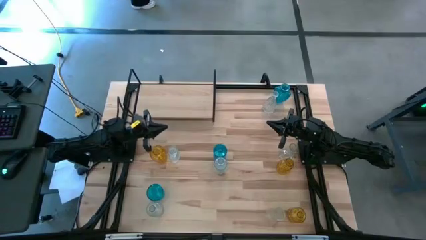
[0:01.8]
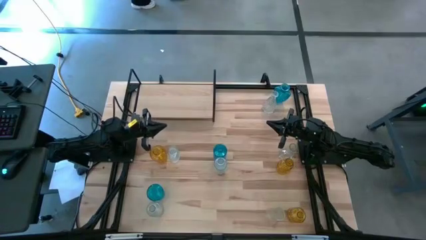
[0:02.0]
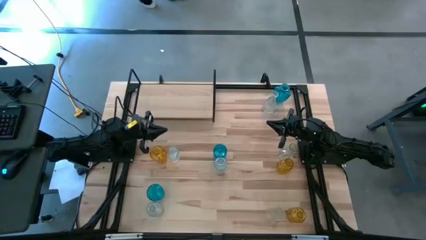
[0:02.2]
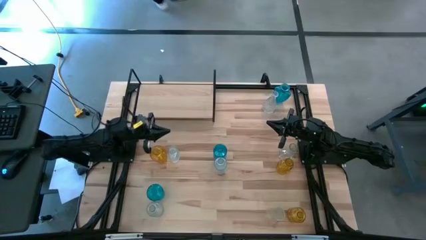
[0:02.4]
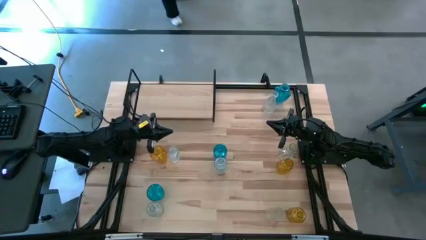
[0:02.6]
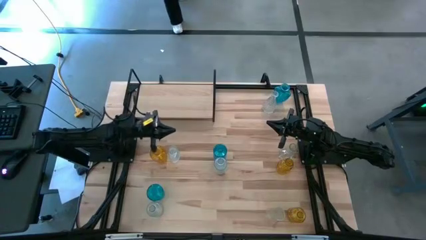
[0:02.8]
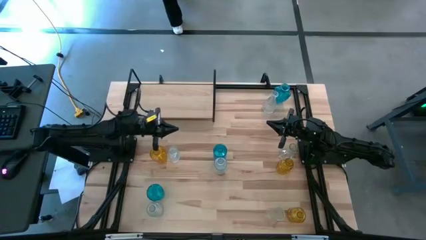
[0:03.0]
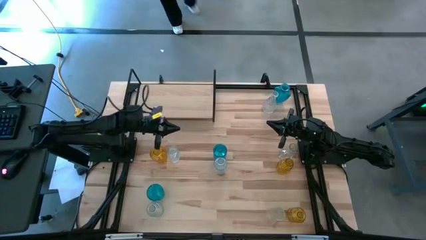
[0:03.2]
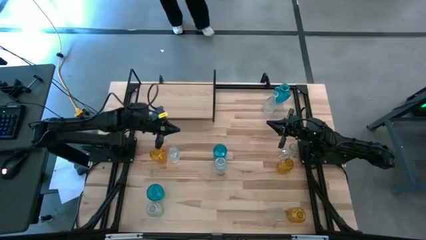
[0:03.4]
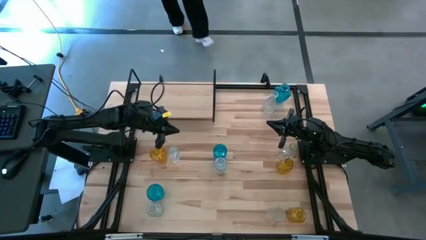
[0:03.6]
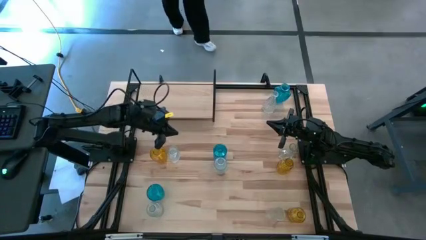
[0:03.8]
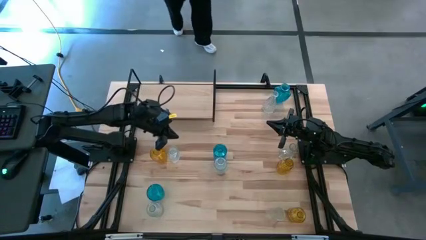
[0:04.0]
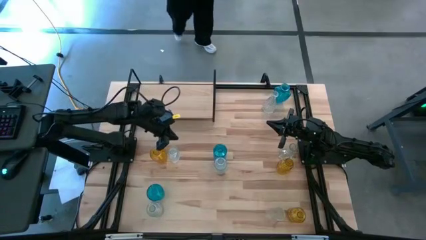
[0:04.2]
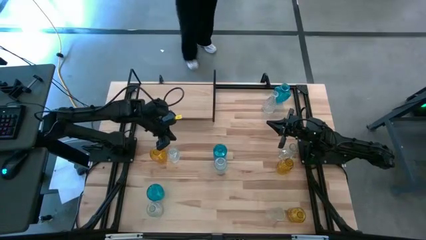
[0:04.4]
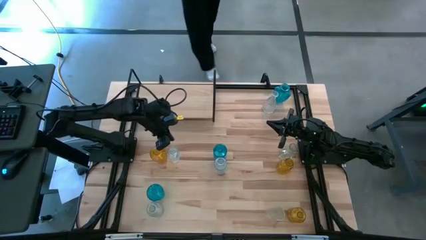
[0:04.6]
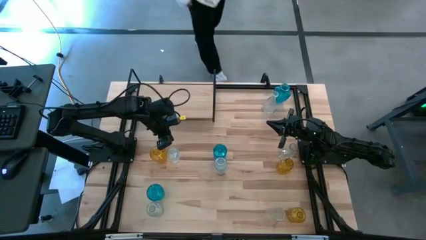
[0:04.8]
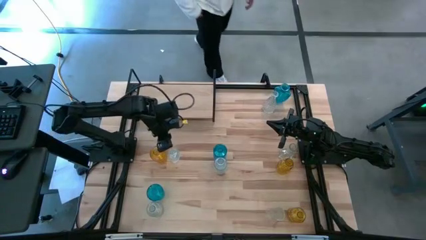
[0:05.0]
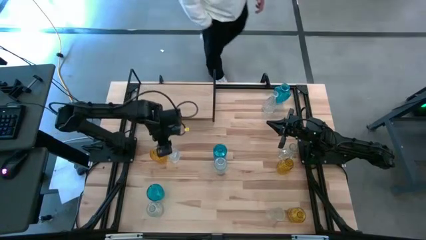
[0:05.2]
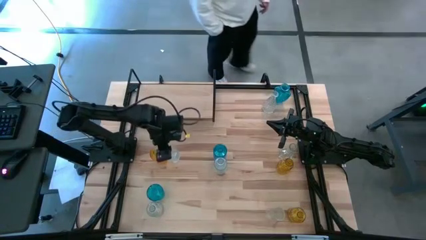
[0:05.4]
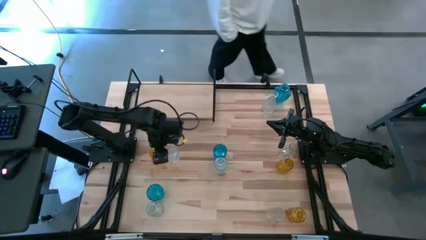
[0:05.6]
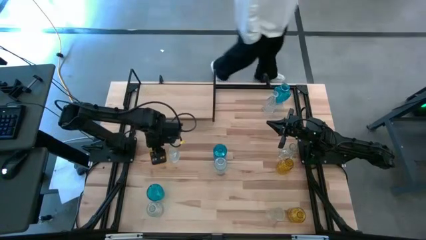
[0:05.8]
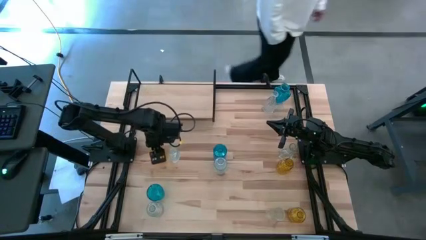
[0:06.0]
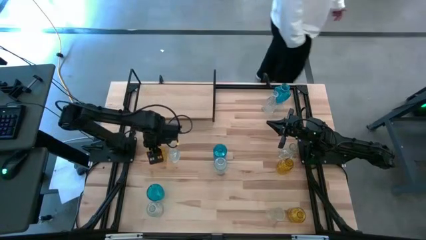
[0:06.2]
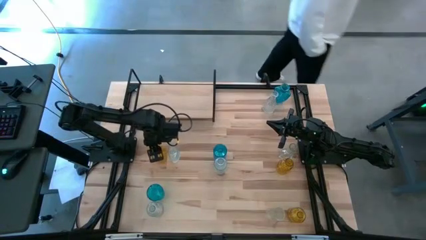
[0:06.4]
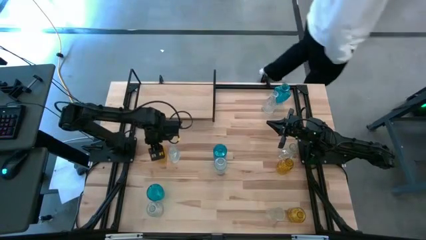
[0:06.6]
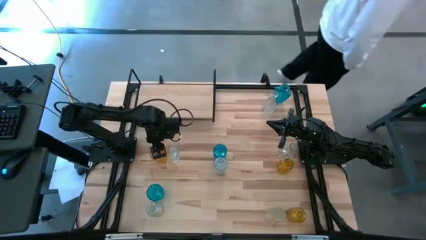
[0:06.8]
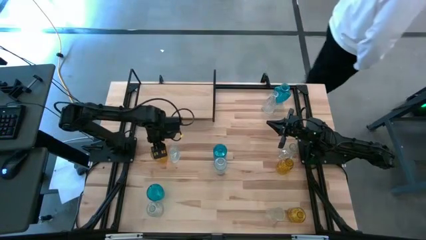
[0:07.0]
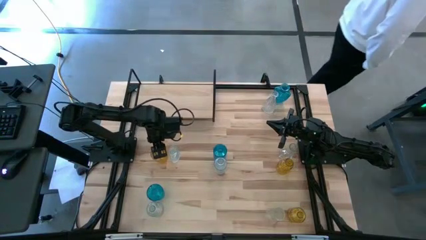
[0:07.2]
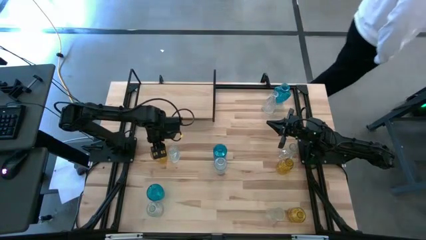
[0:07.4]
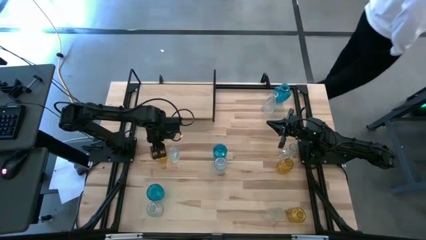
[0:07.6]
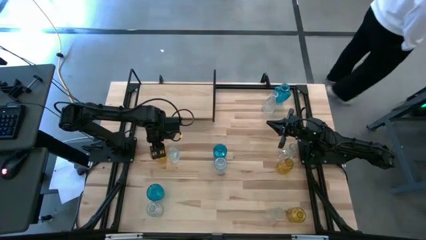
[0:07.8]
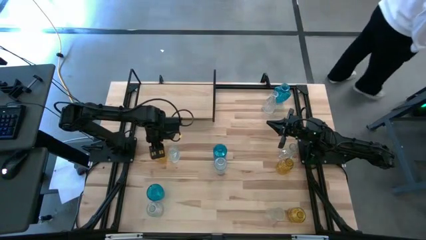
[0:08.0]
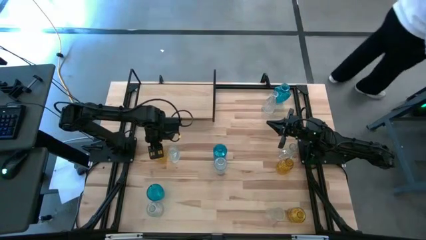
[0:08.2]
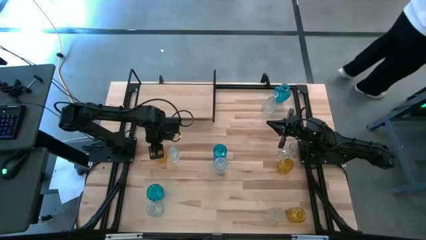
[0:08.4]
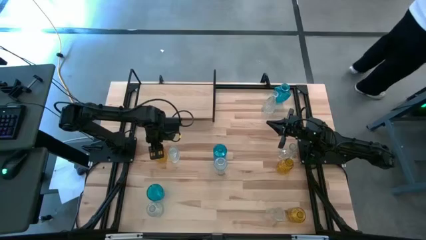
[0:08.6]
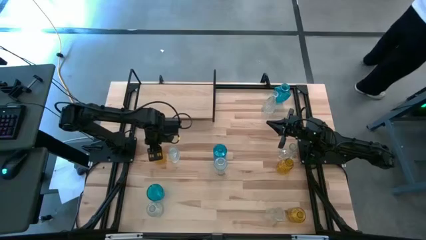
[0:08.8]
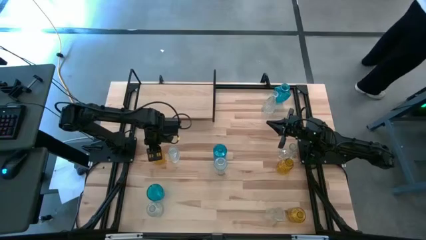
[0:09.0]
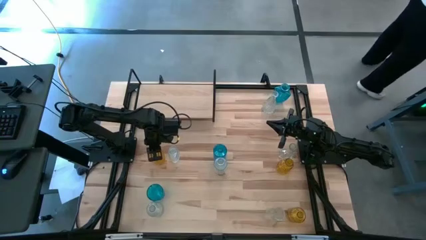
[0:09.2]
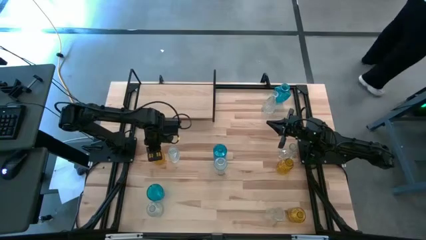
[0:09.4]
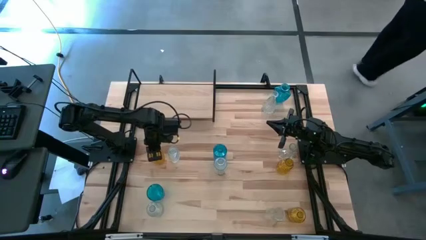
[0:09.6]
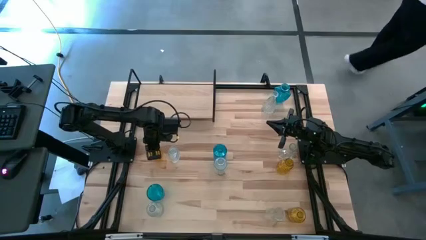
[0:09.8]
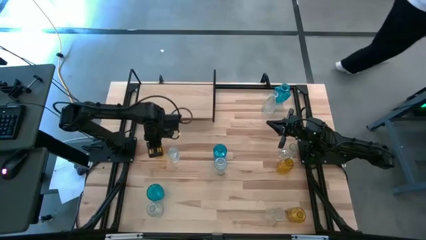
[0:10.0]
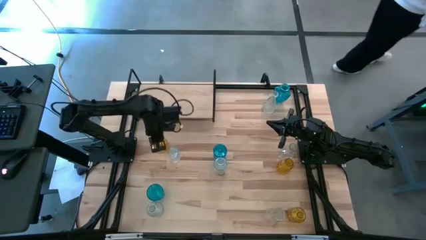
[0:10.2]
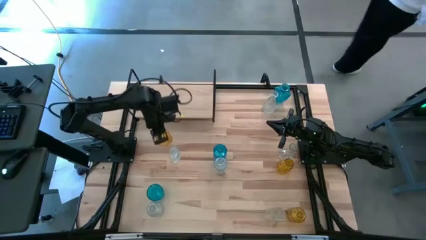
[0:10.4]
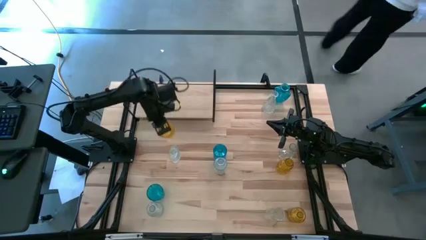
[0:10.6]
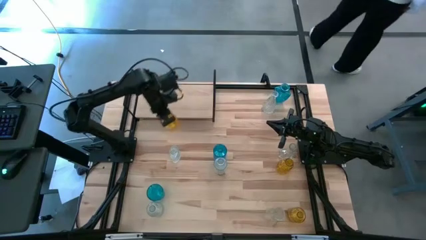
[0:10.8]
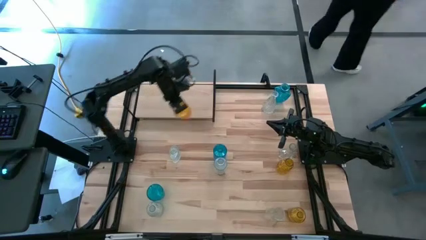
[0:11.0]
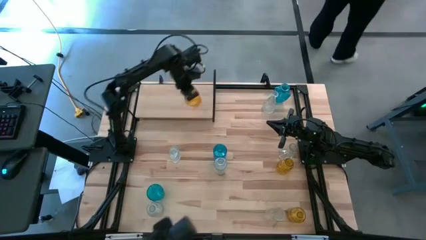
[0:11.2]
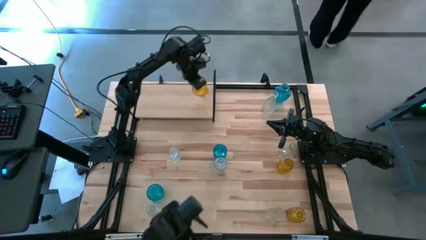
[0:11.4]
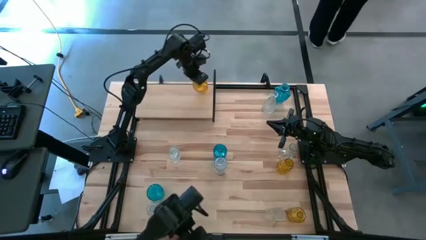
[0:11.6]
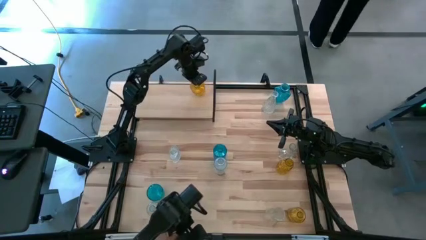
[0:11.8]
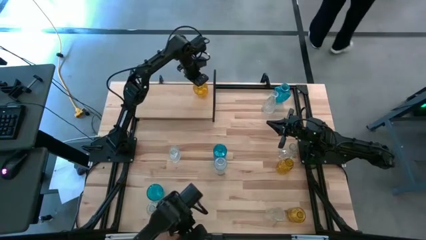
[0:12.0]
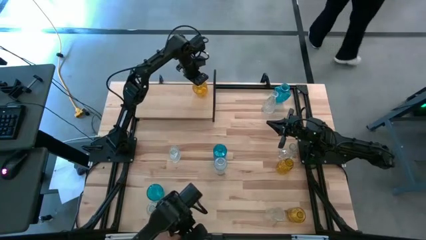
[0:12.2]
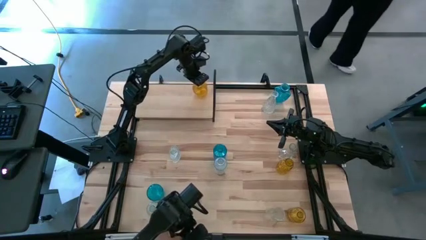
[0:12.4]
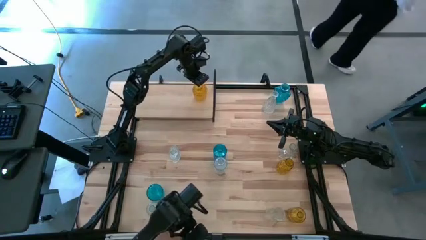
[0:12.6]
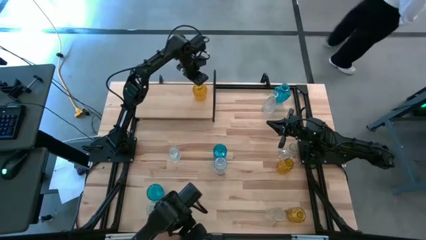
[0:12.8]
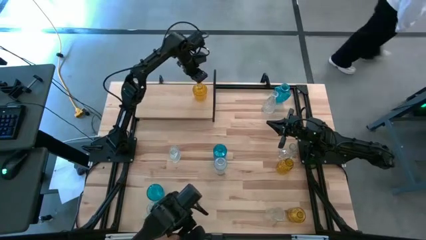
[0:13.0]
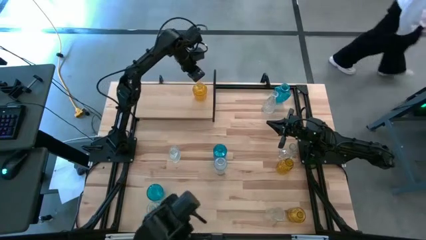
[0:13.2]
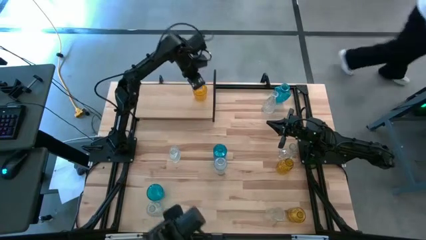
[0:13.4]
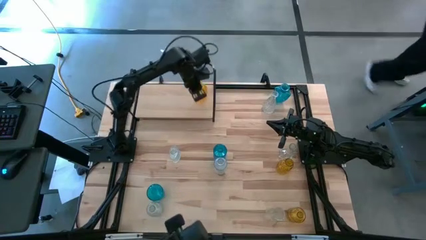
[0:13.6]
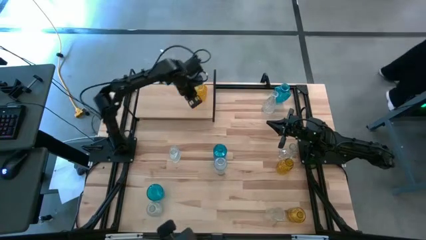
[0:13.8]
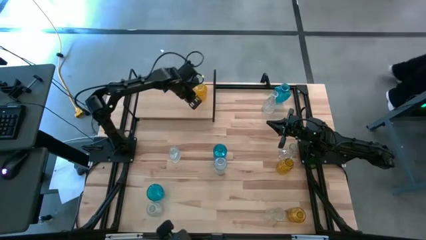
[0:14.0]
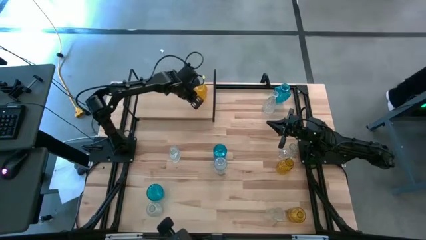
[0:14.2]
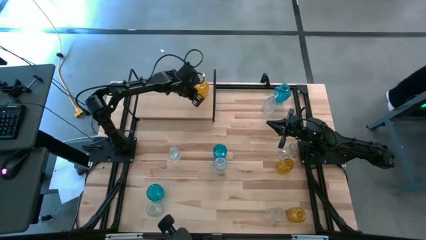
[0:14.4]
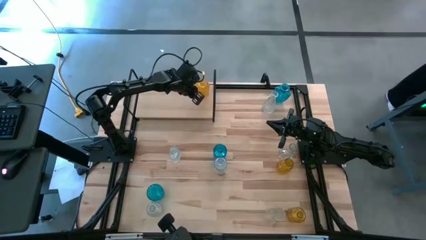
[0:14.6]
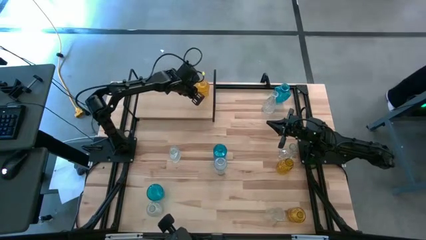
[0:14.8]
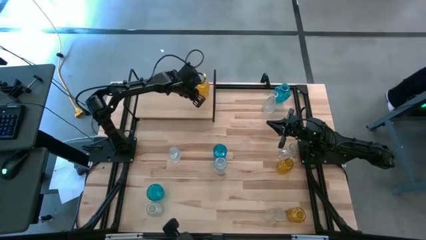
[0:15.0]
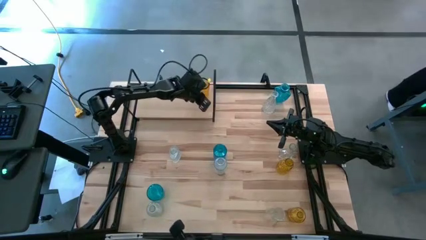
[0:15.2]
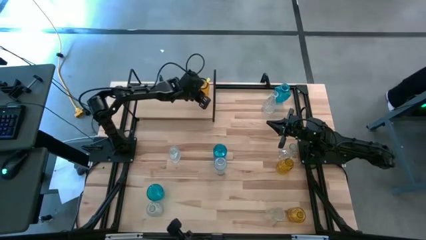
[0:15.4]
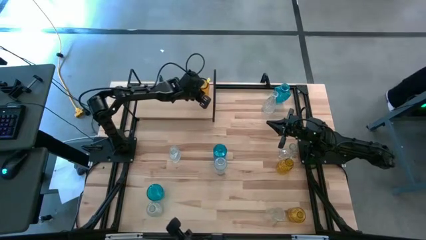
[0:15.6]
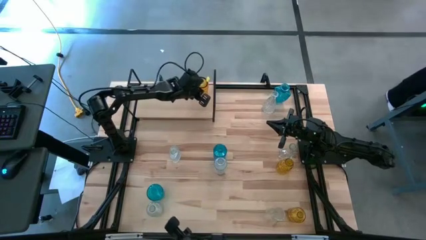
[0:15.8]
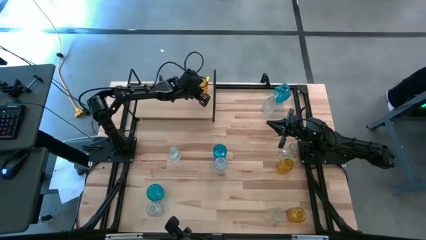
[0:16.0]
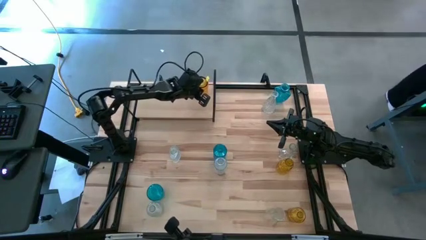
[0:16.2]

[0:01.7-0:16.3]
Task: sort vases onto shelf
Put the yellow vase on the shelf
